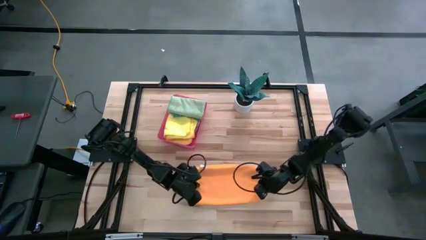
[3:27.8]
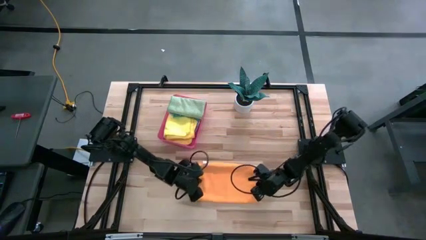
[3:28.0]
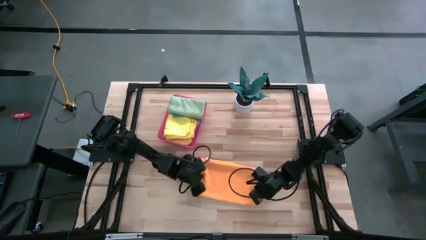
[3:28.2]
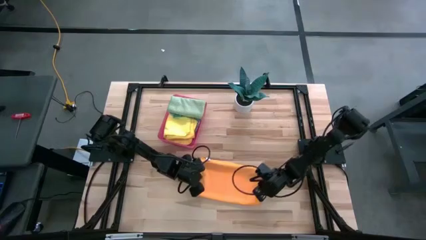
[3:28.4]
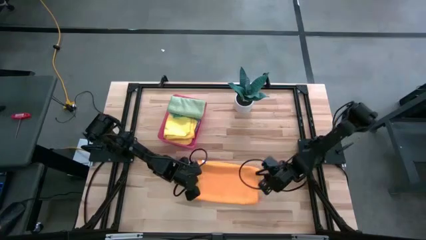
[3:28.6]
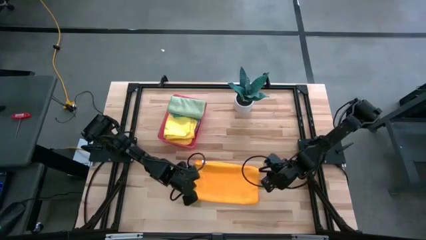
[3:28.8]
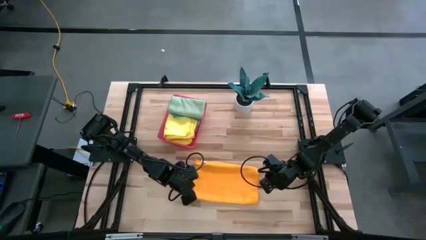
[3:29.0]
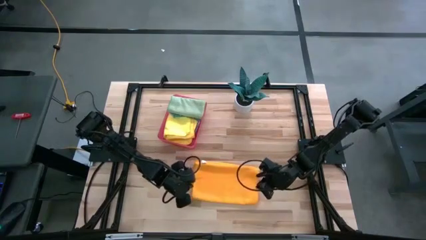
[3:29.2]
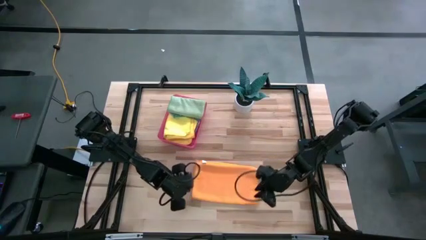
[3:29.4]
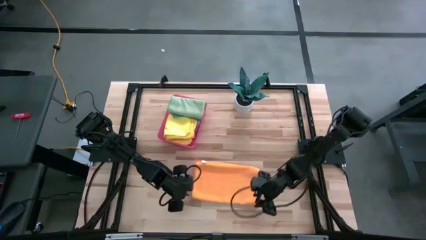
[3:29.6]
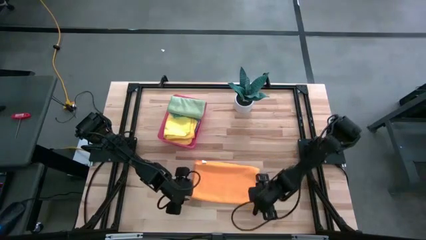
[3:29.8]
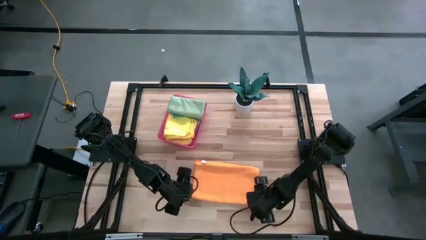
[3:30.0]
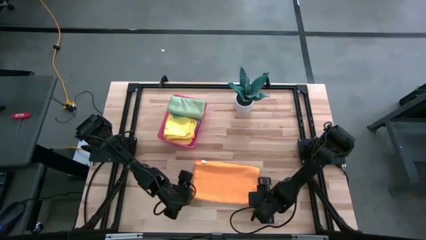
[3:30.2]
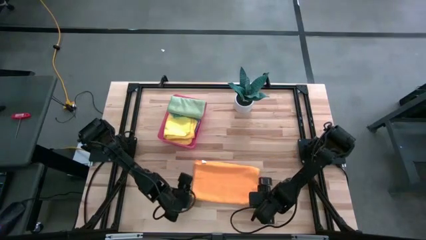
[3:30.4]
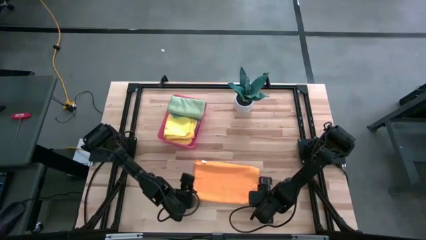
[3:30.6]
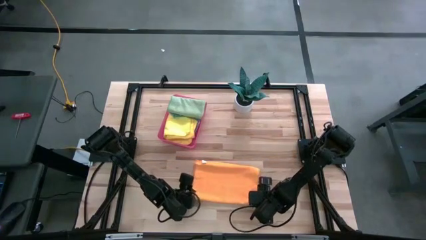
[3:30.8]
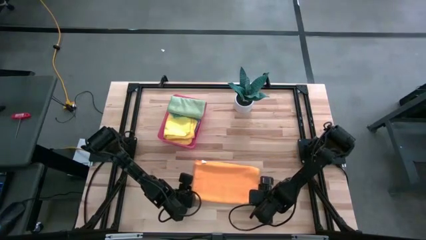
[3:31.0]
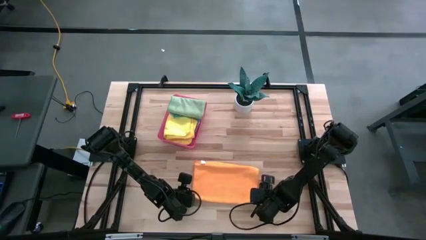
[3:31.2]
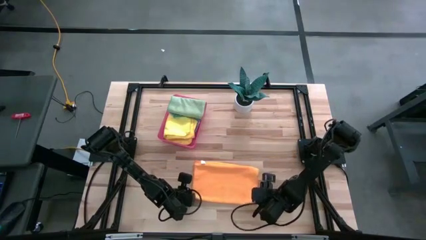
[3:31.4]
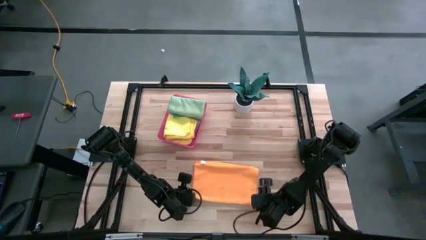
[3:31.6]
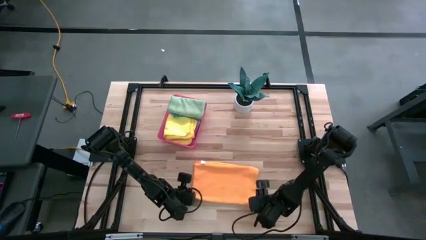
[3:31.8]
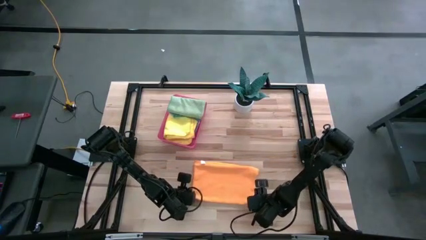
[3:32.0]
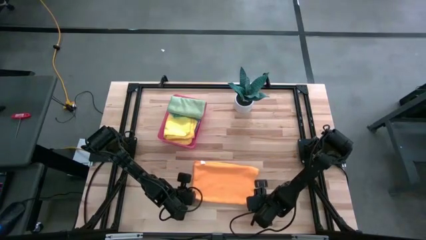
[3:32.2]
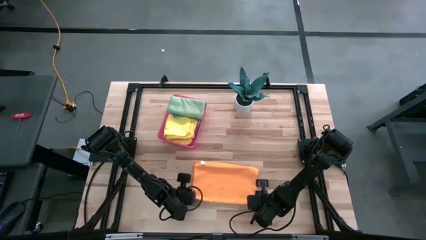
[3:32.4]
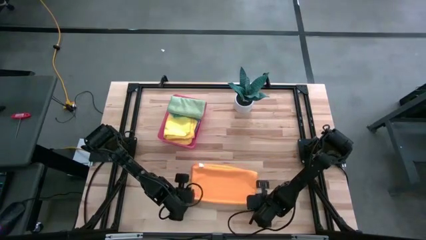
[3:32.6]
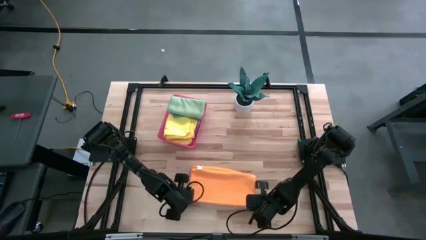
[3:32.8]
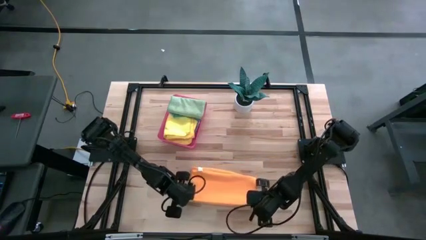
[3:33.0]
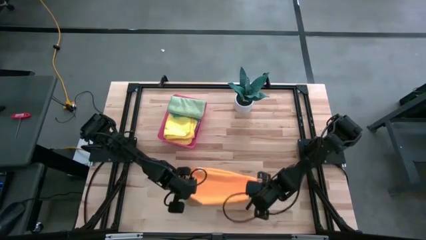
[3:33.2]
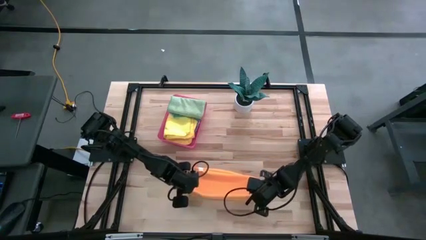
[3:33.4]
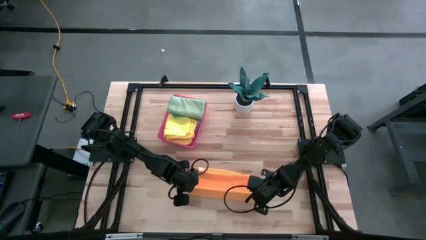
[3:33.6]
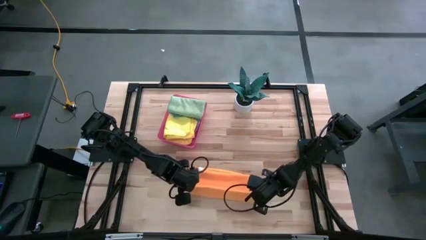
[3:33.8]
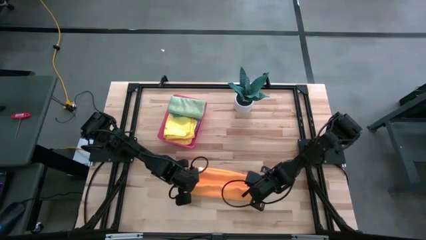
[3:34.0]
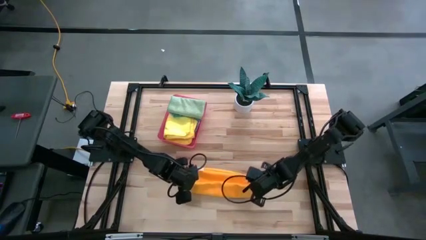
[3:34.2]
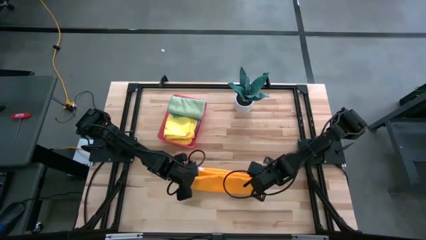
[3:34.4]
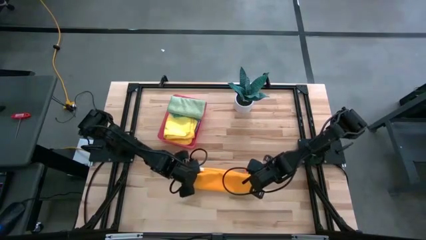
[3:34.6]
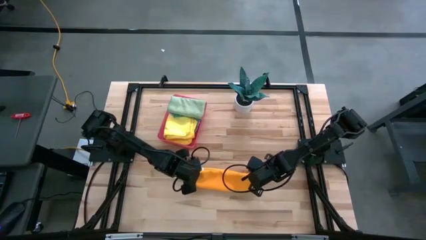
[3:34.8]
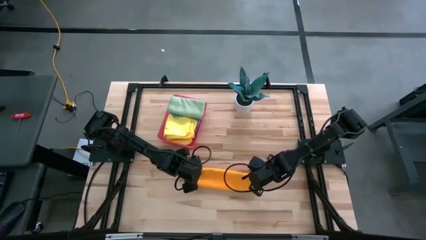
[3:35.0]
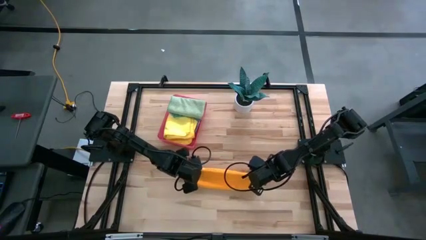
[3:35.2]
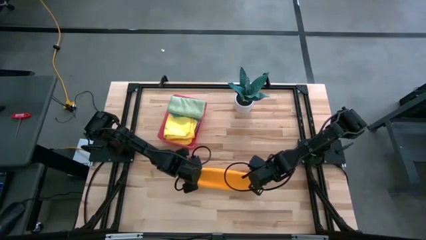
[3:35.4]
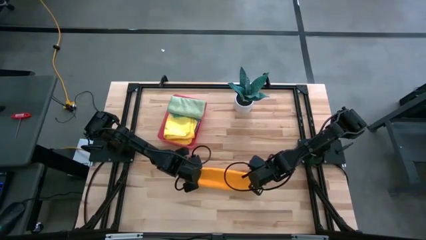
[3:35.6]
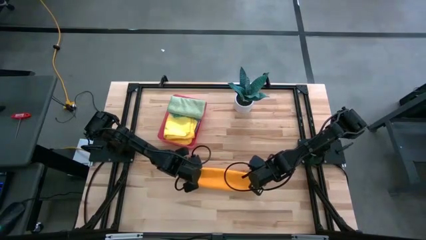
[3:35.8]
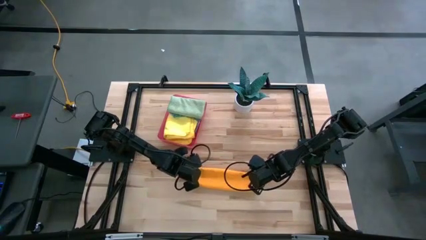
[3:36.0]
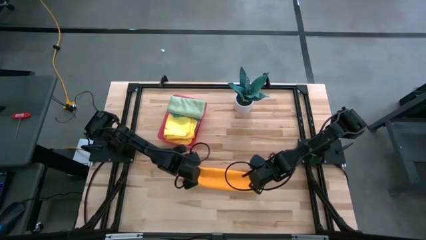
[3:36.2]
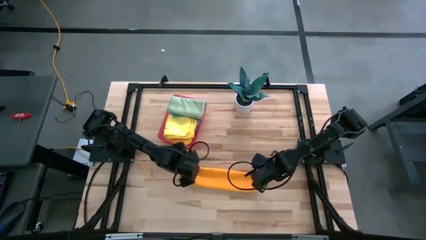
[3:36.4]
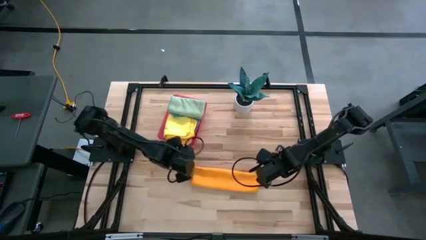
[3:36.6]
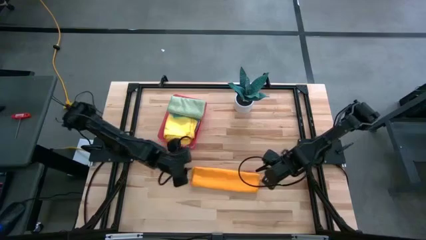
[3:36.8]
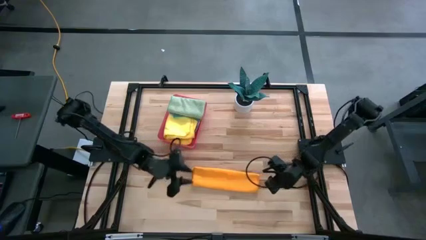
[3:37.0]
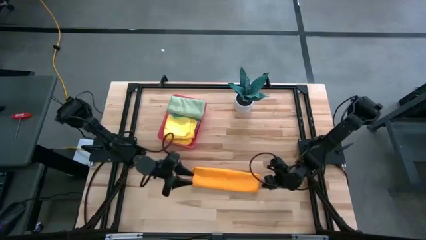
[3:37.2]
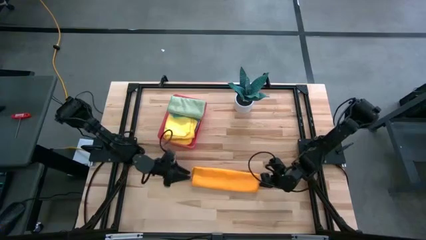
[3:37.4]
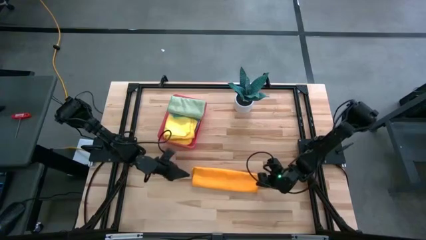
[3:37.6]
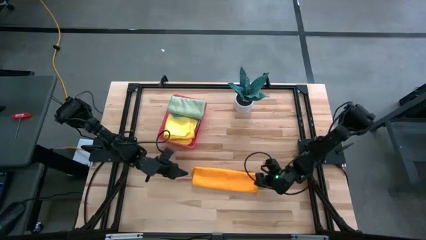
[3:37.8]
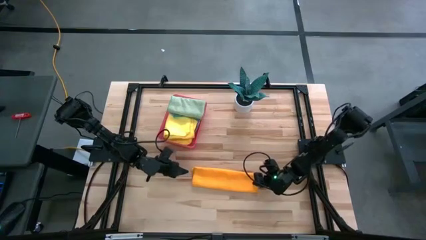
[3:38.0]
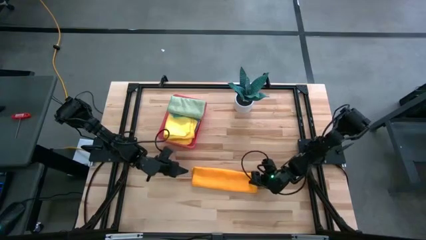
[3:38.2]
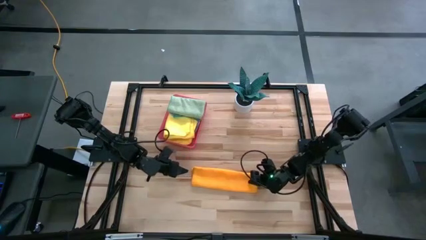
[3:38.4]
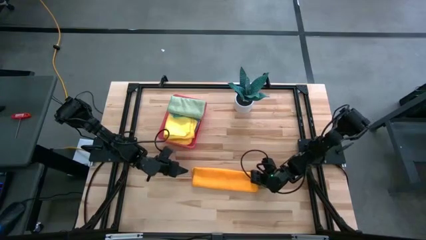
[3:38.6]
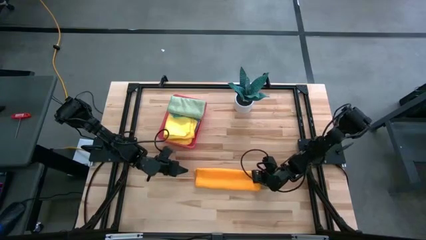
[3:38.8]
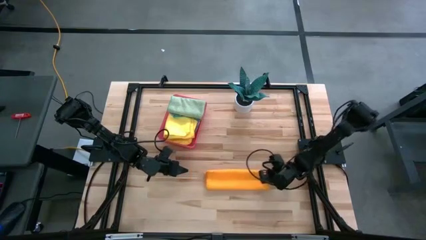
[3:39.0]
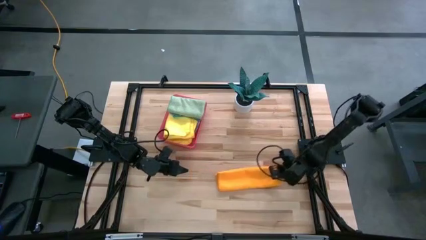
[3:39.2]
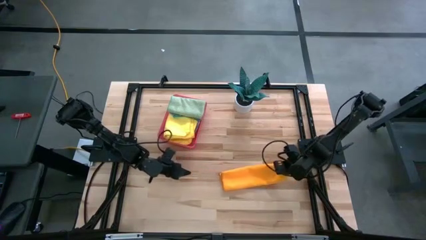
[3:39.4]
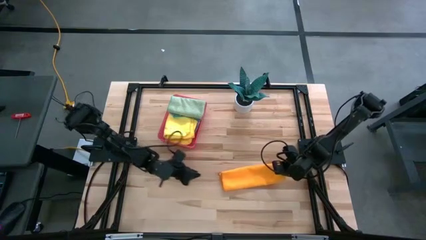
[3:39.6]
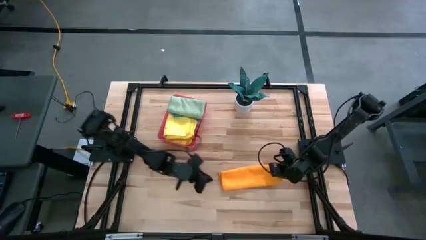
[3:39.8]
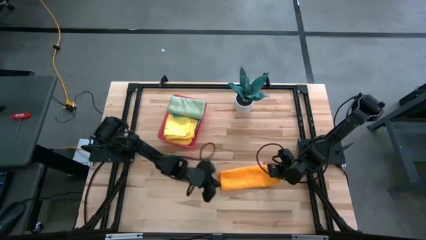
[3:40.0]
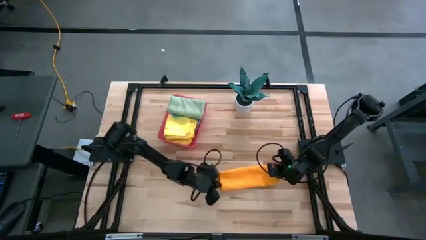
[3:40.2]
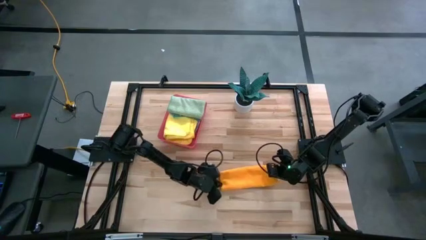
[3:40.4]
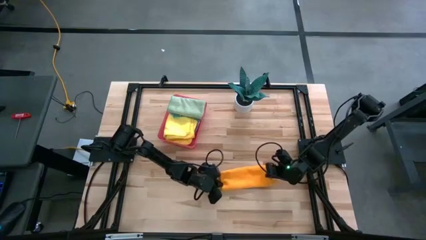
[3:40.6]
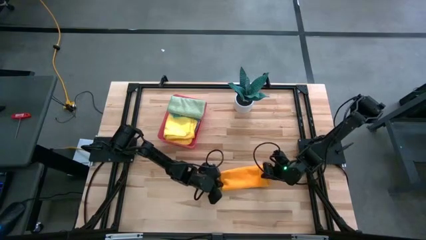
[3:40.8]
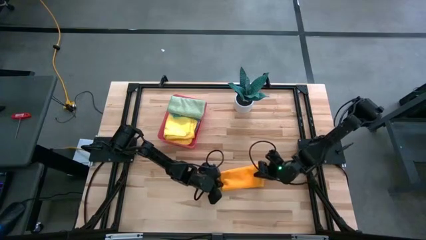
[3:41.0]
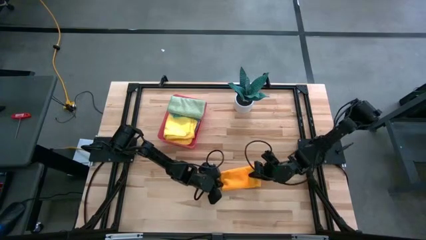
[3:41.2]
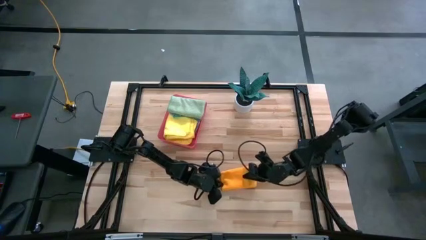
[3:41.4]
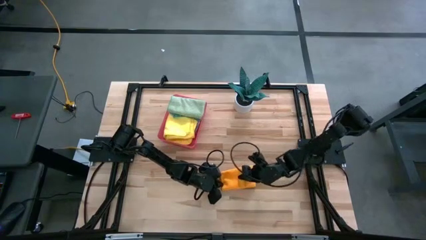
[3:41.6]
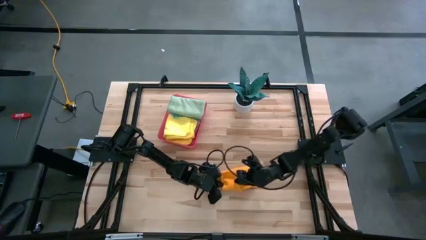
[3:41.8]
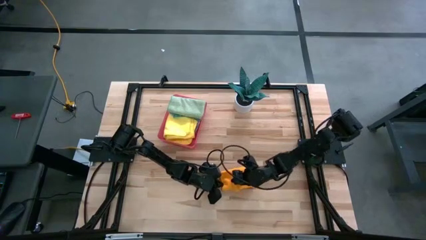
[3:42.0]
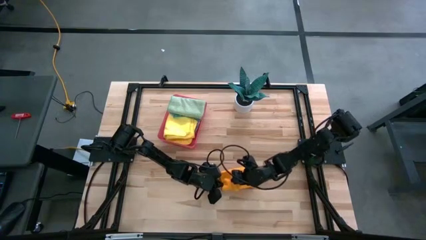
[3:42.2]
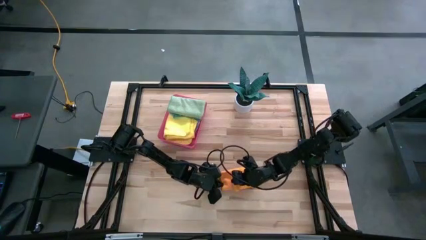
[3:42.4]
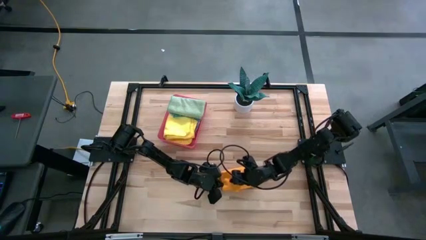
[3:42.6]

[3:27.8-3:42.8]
Task: Fold microfiber towels
Fold the orange microfiber towel
